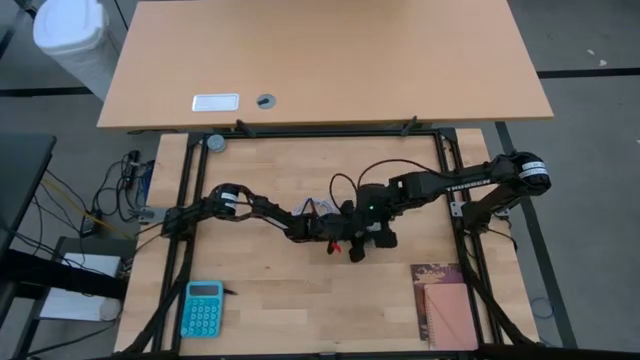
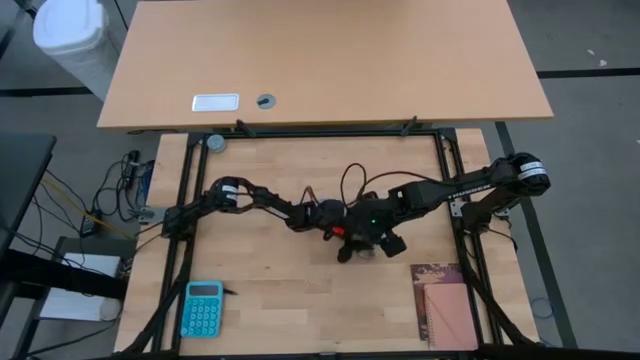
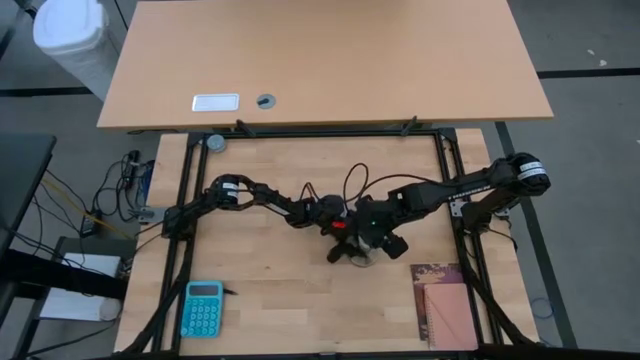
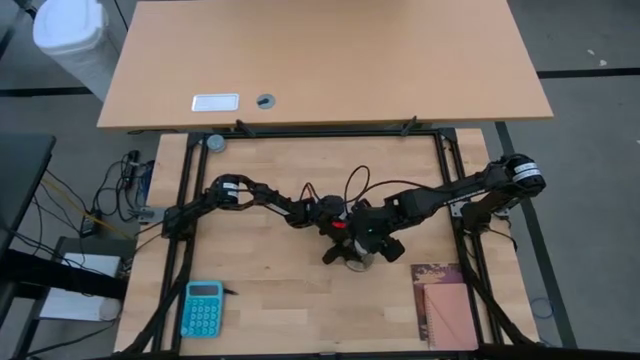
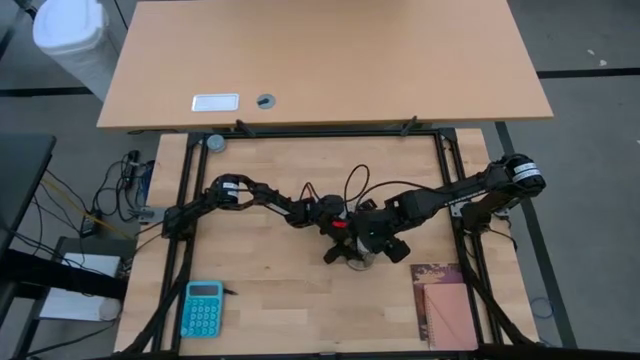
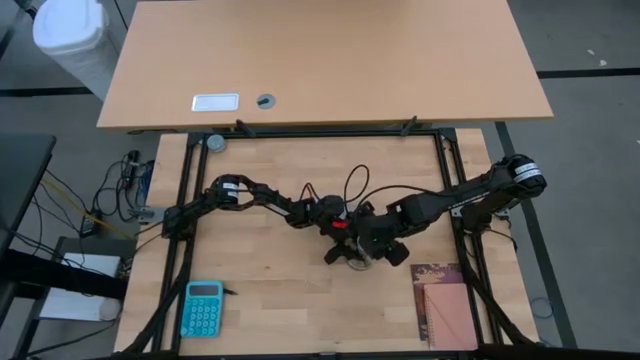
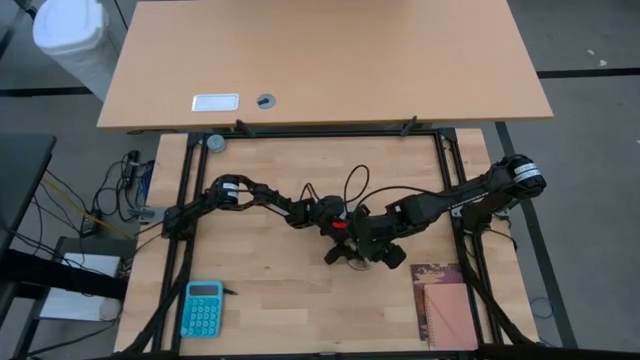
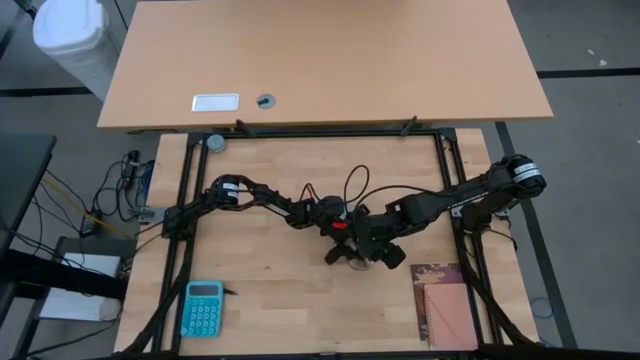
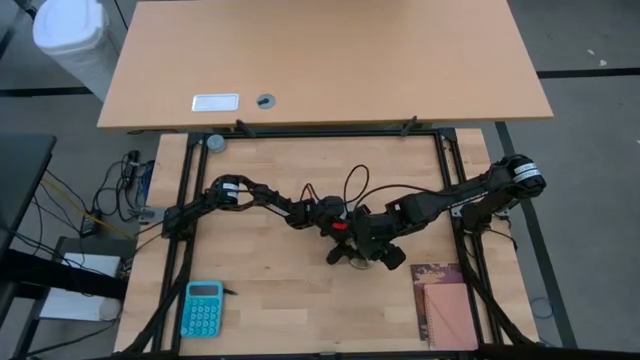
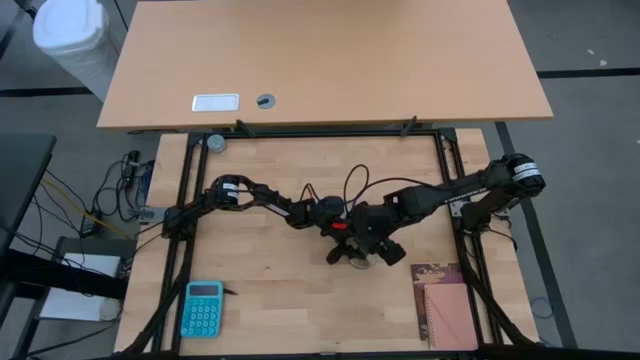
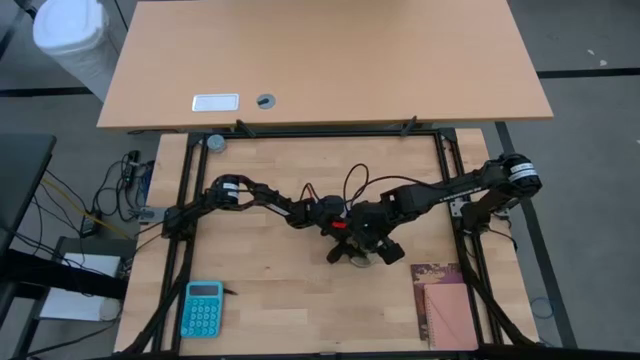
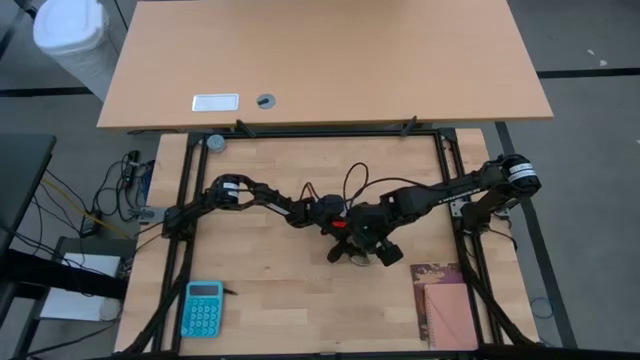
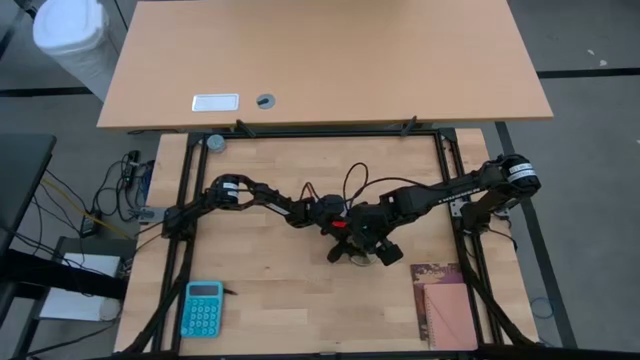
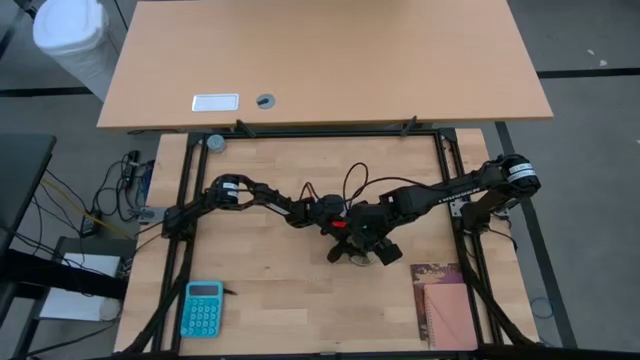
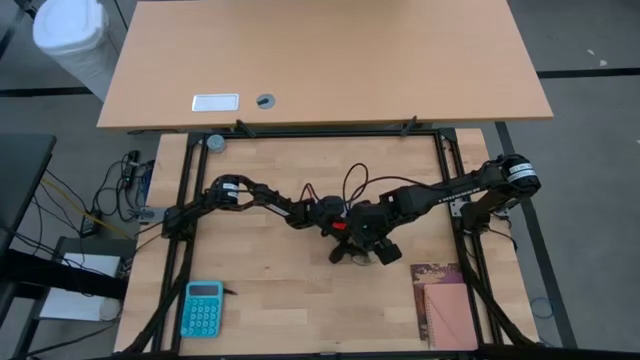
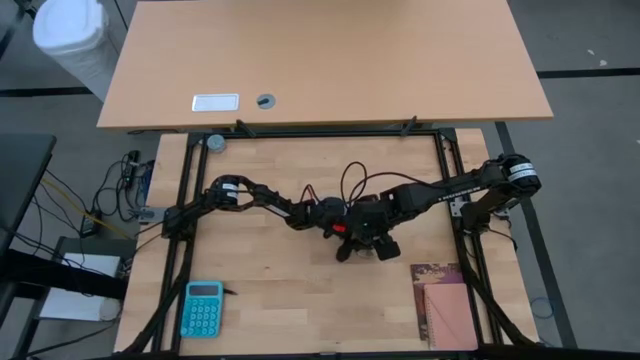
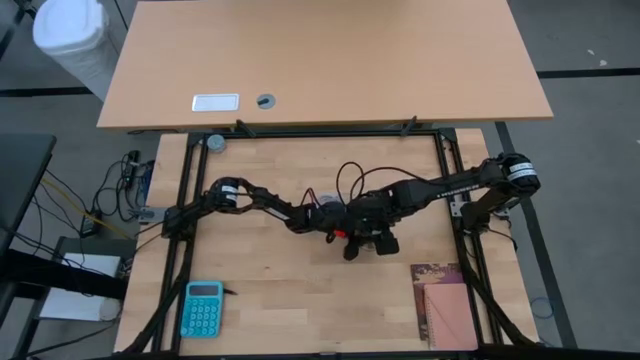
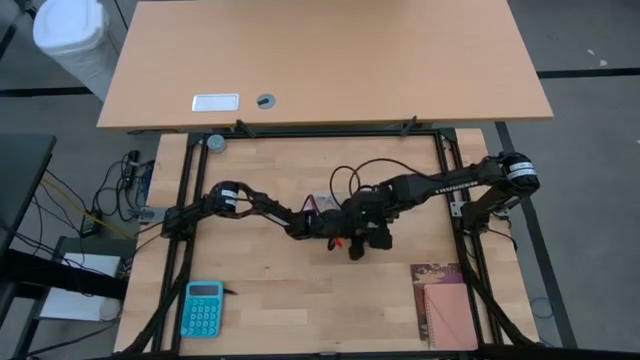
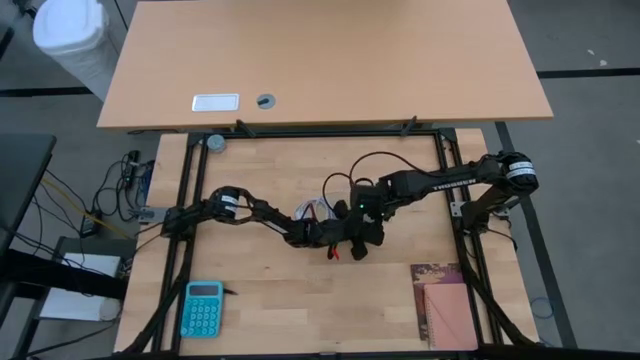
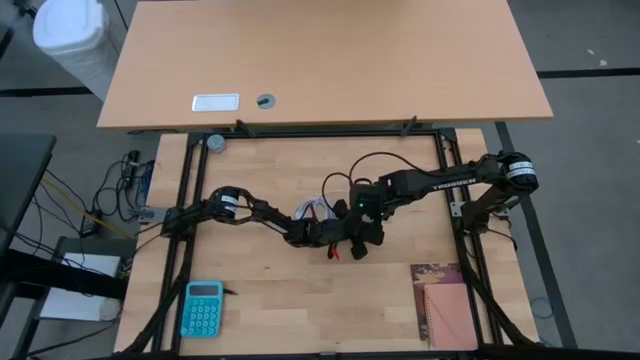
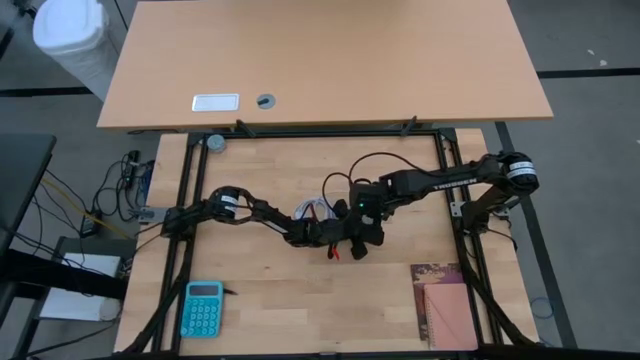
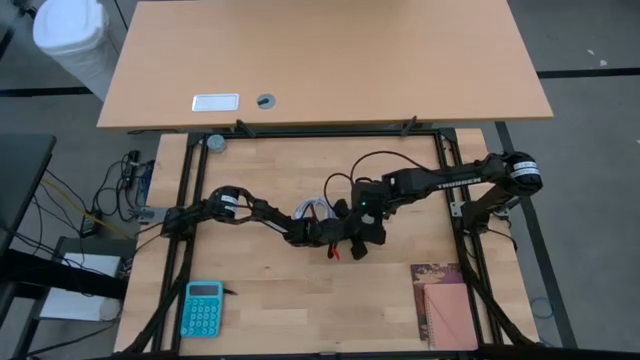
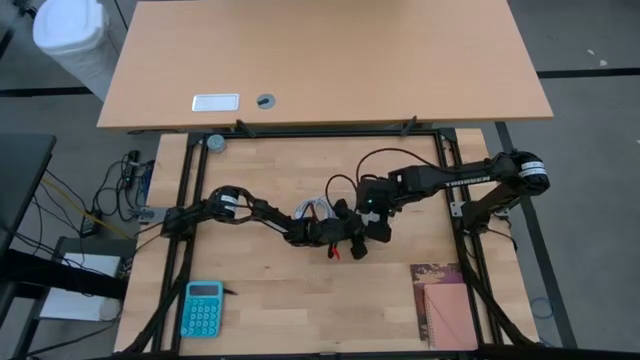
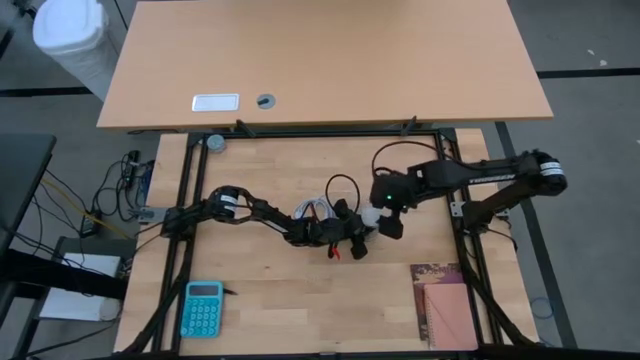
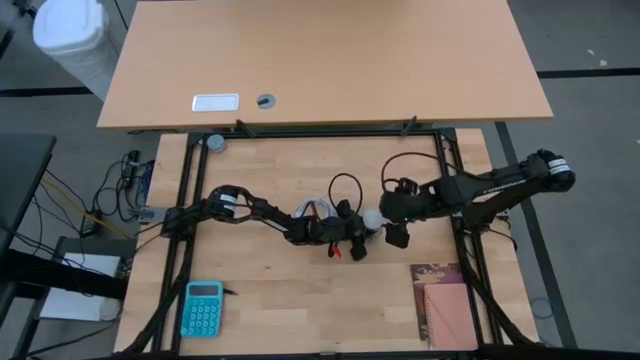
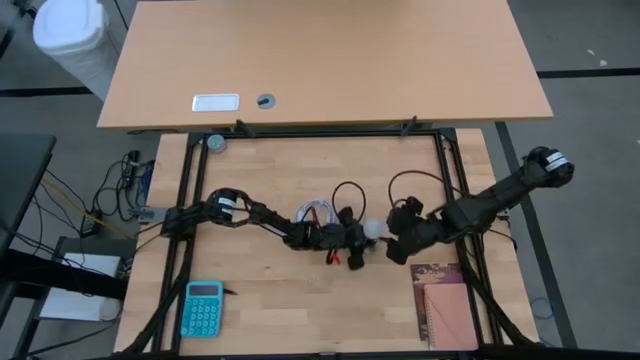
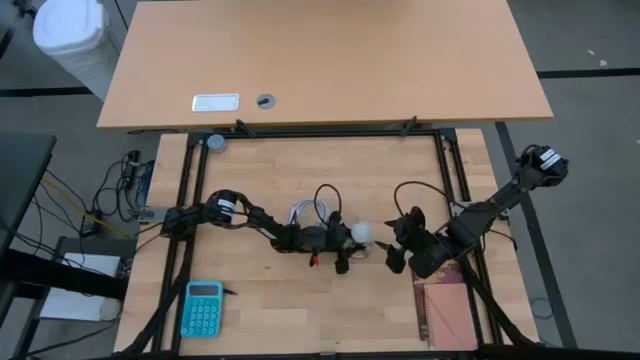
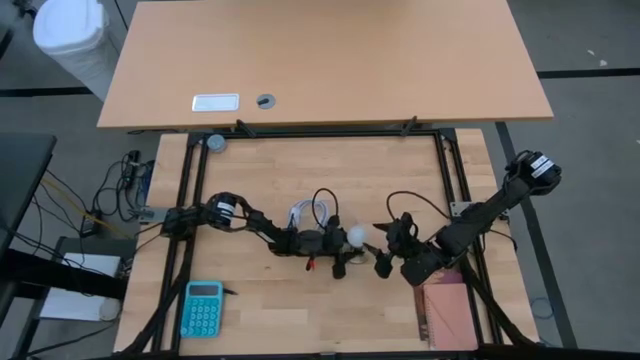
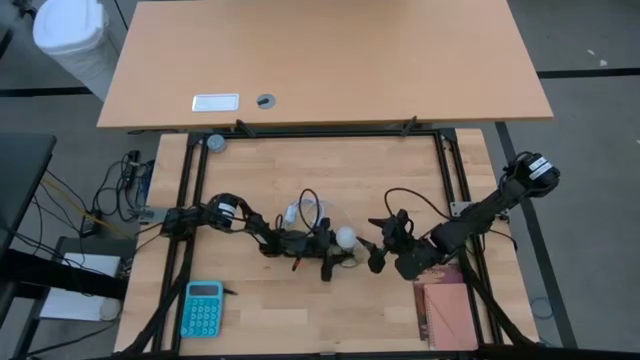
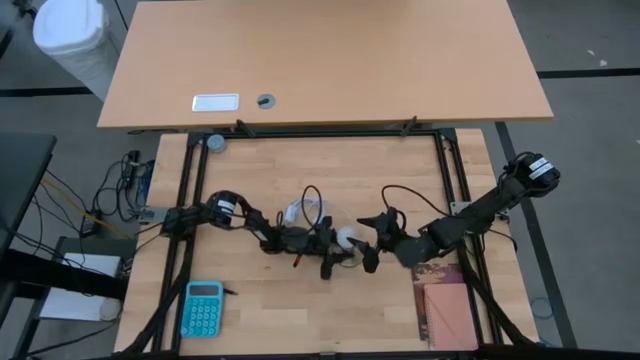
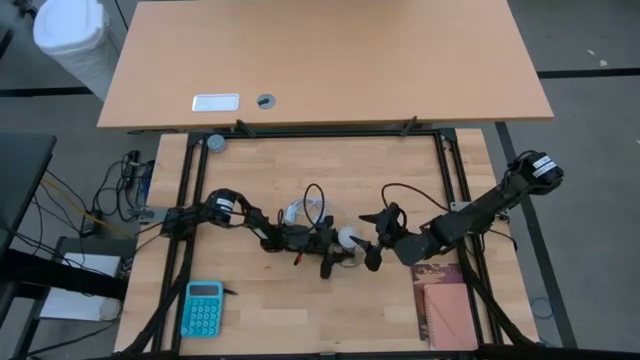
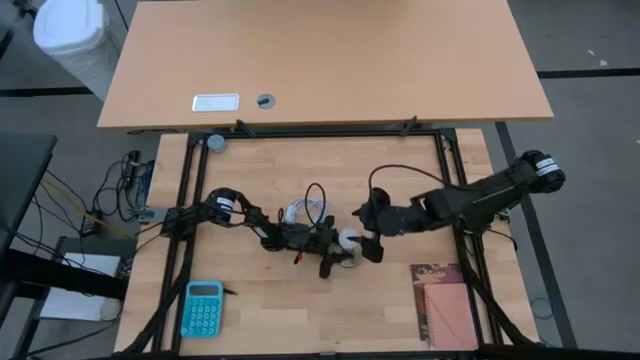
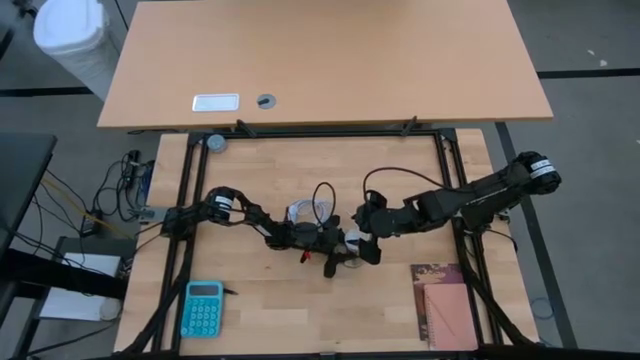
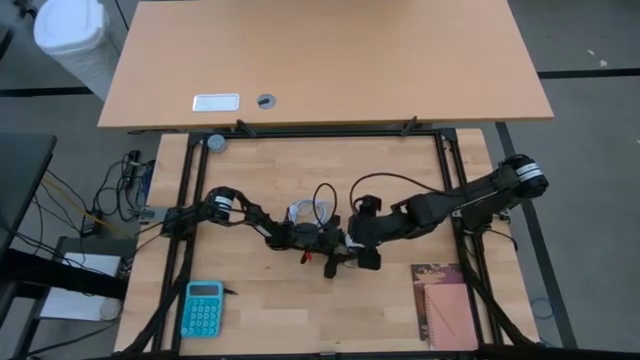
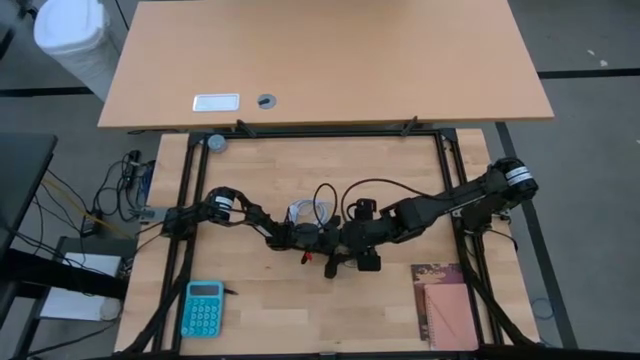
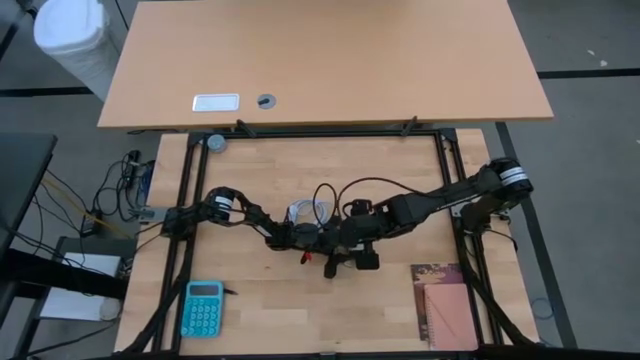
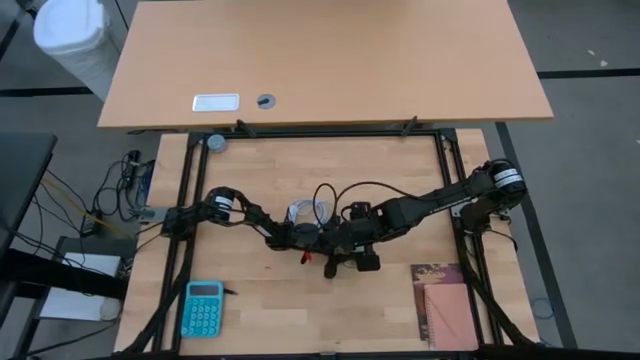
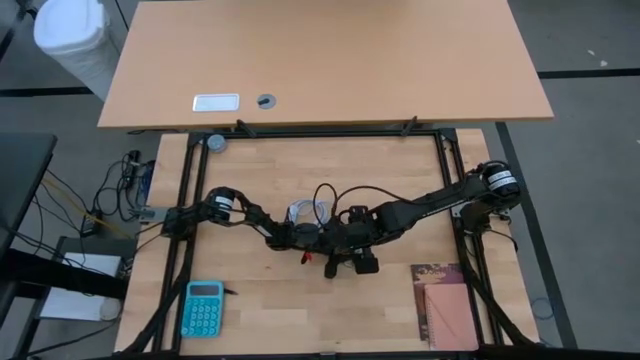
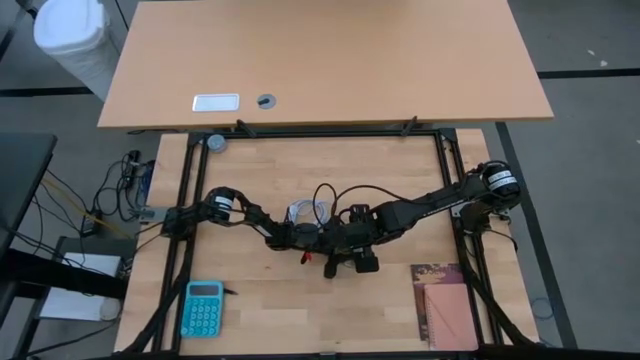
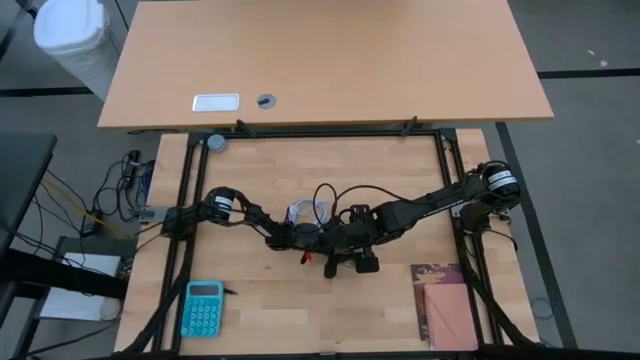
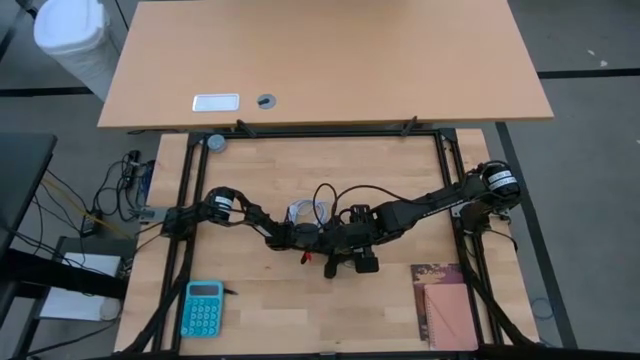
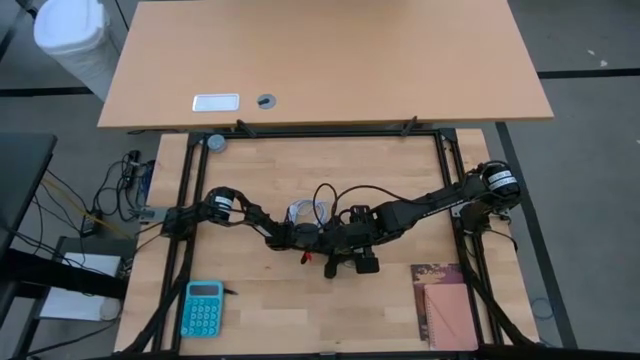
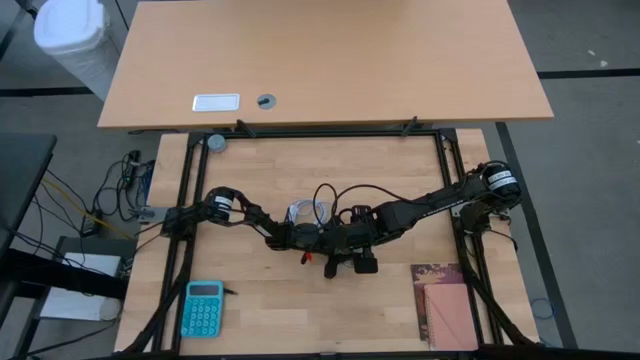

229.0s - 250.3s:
Task: Screw lightbulb
Insert the white lightbulb into the lamp socket
